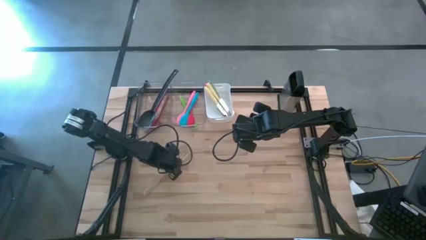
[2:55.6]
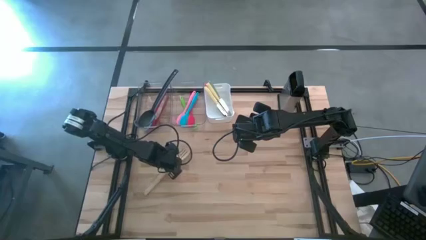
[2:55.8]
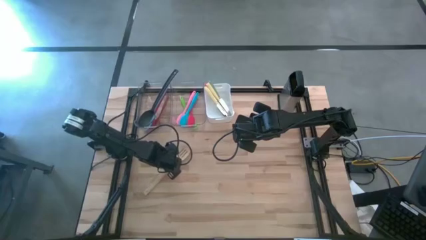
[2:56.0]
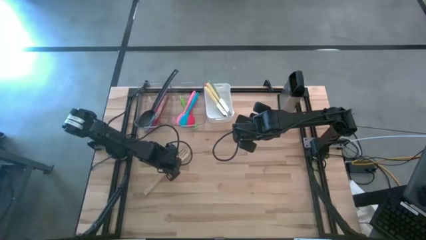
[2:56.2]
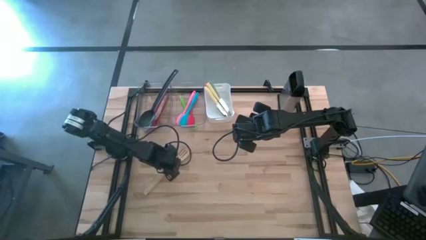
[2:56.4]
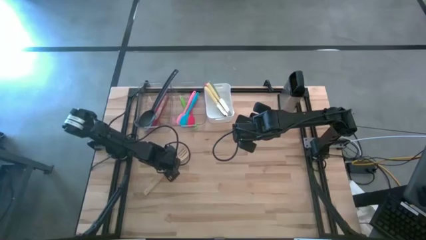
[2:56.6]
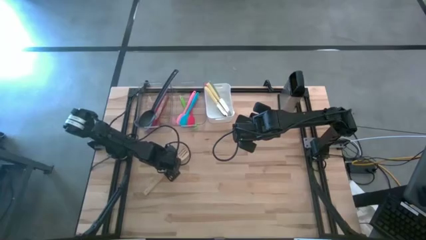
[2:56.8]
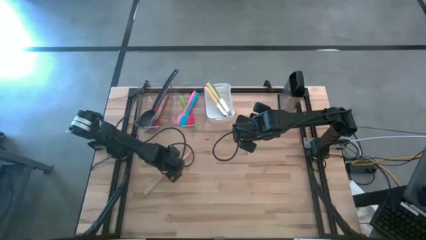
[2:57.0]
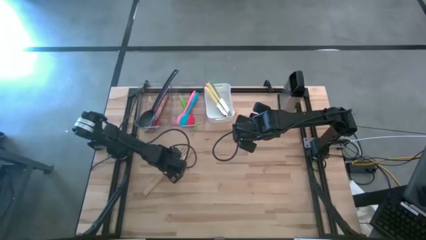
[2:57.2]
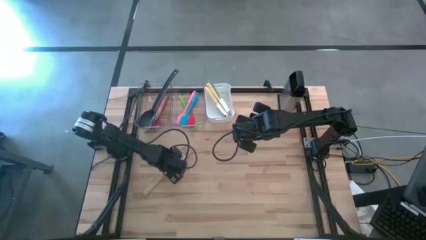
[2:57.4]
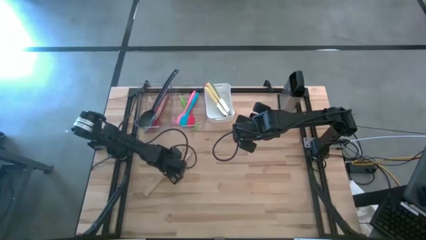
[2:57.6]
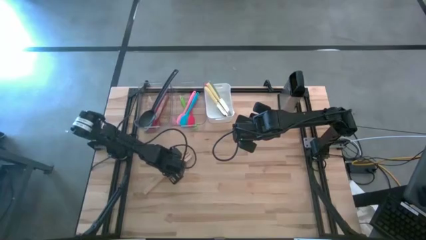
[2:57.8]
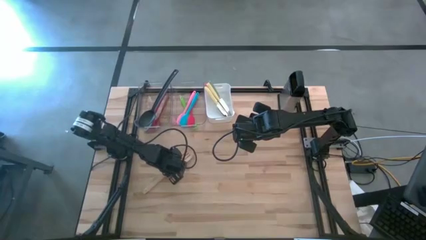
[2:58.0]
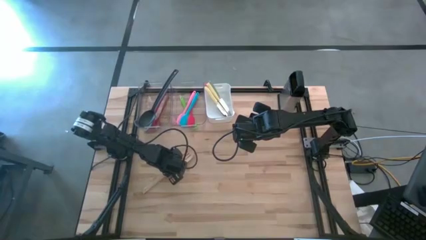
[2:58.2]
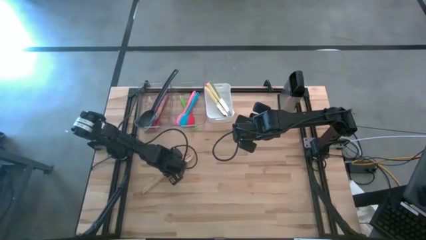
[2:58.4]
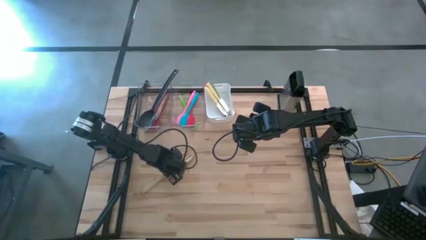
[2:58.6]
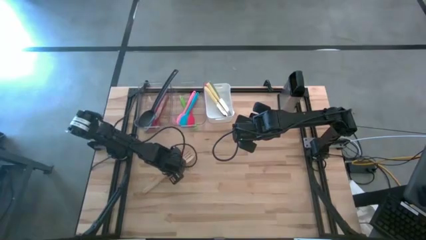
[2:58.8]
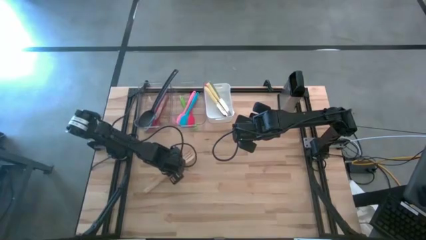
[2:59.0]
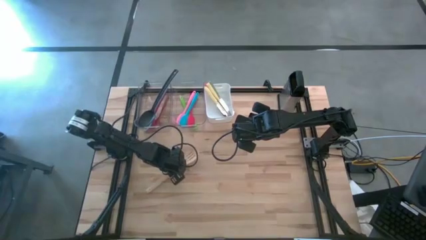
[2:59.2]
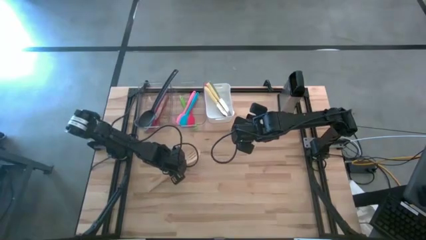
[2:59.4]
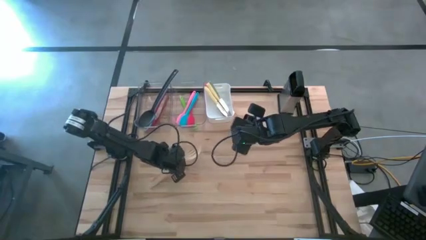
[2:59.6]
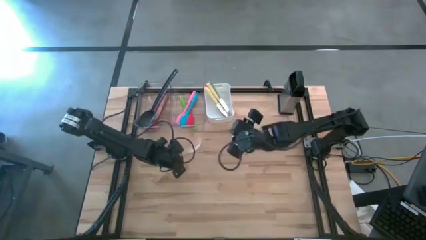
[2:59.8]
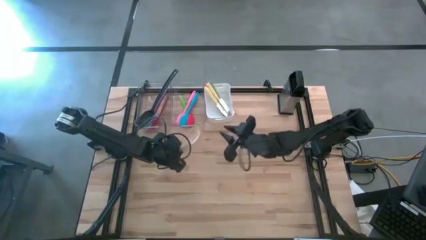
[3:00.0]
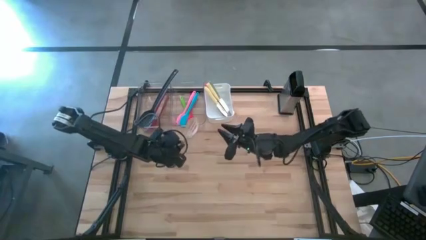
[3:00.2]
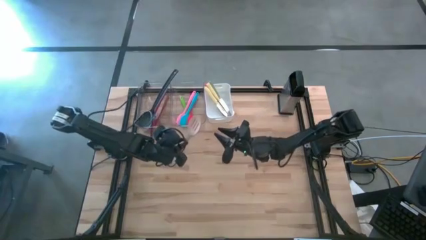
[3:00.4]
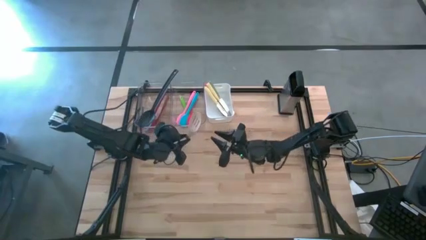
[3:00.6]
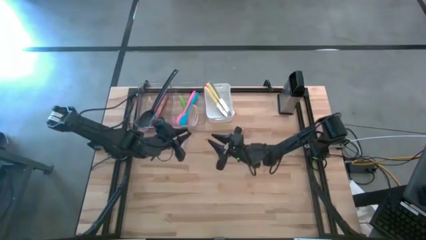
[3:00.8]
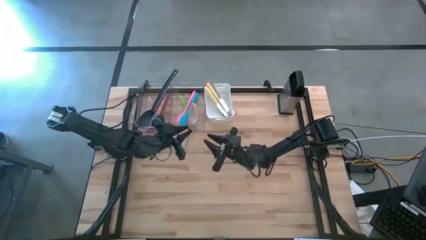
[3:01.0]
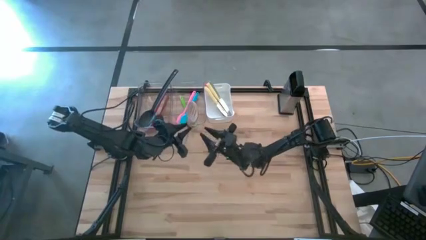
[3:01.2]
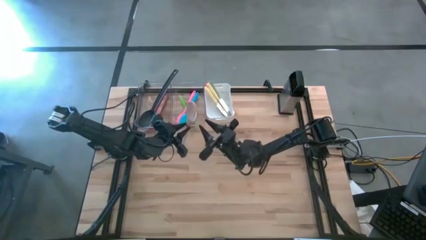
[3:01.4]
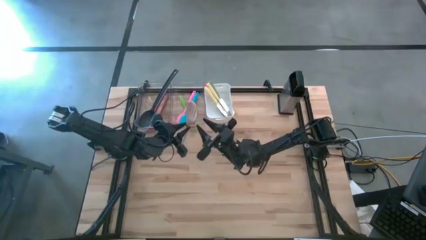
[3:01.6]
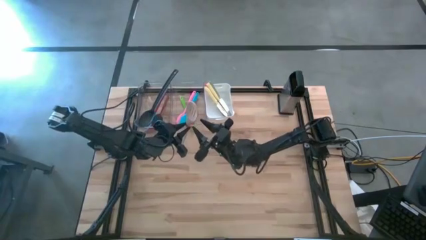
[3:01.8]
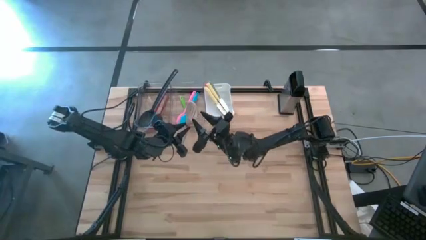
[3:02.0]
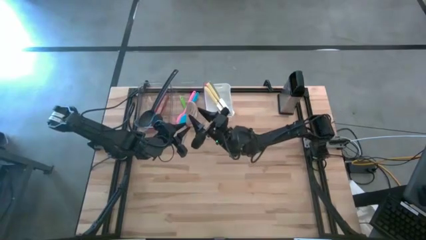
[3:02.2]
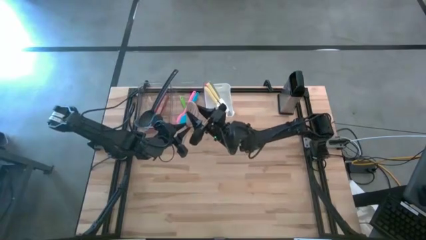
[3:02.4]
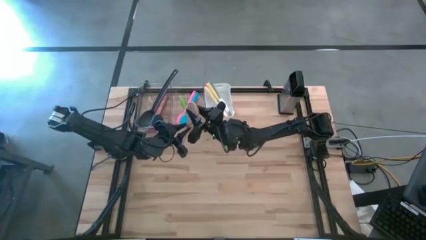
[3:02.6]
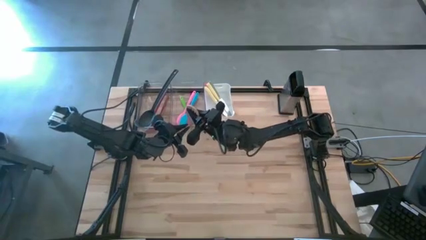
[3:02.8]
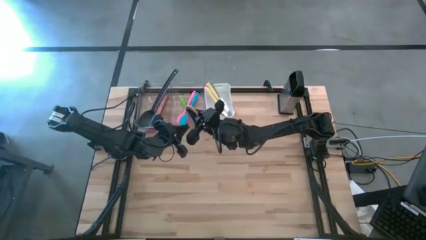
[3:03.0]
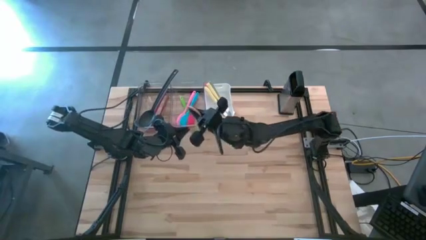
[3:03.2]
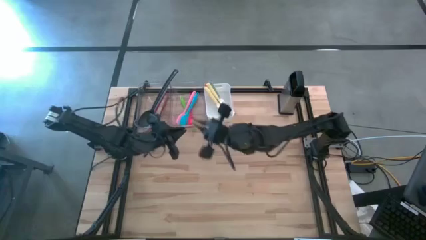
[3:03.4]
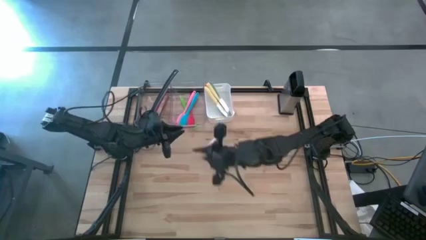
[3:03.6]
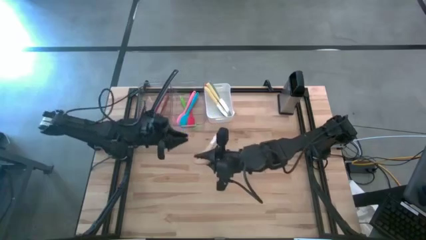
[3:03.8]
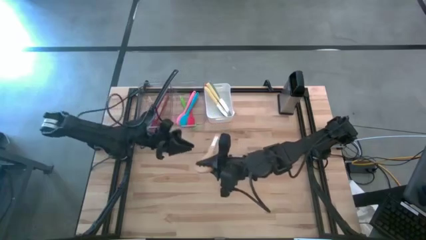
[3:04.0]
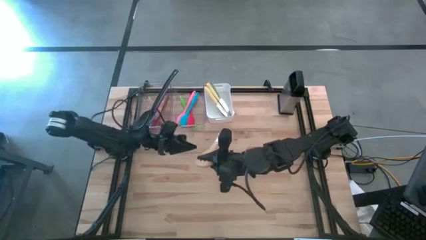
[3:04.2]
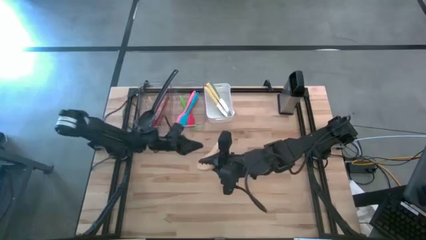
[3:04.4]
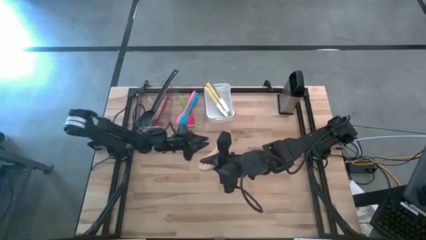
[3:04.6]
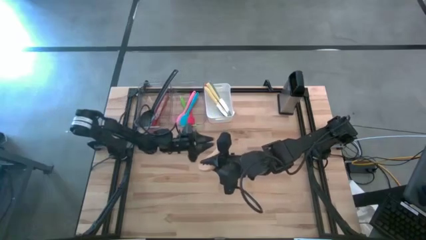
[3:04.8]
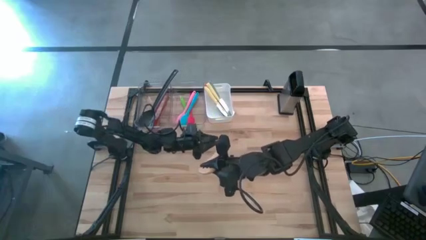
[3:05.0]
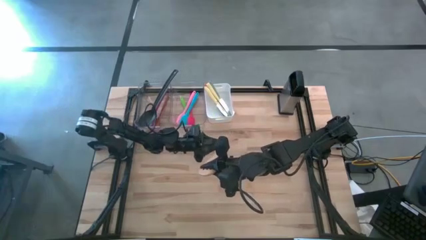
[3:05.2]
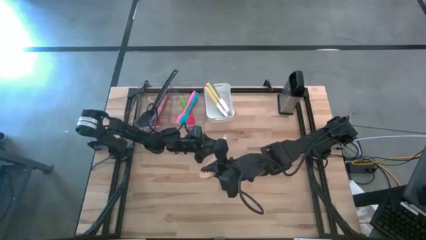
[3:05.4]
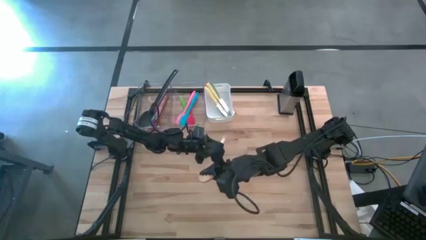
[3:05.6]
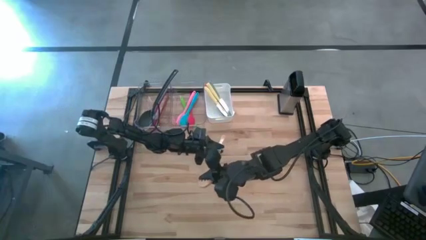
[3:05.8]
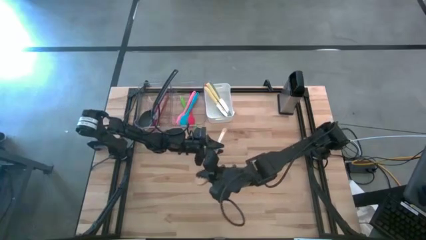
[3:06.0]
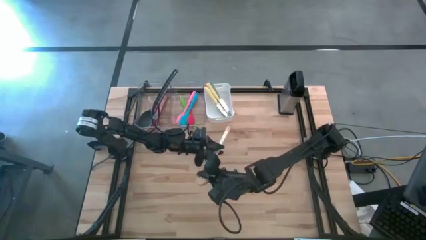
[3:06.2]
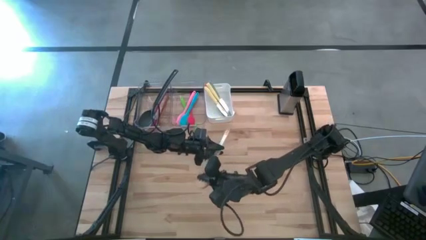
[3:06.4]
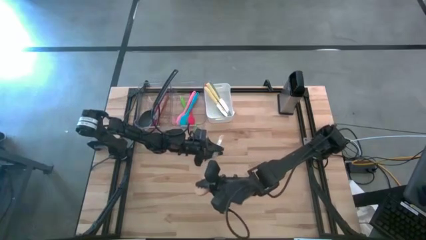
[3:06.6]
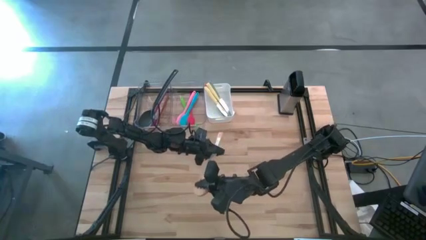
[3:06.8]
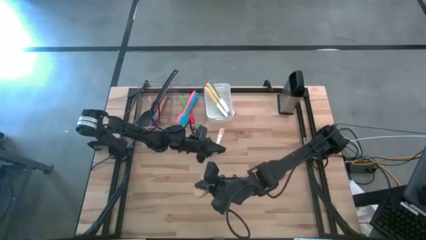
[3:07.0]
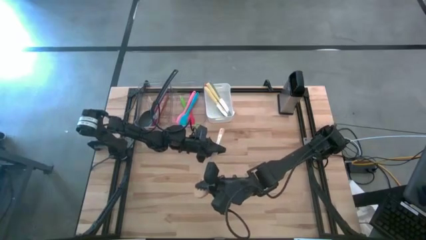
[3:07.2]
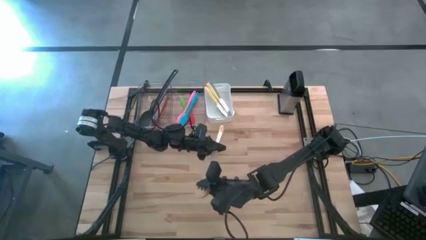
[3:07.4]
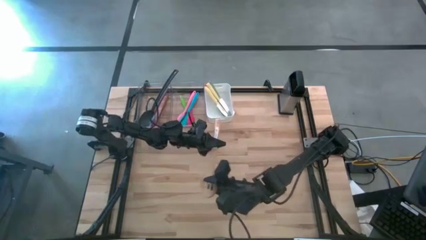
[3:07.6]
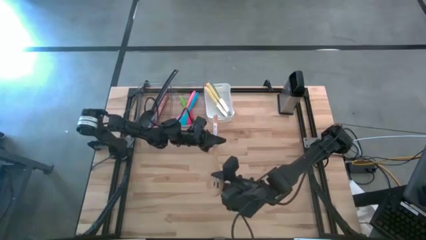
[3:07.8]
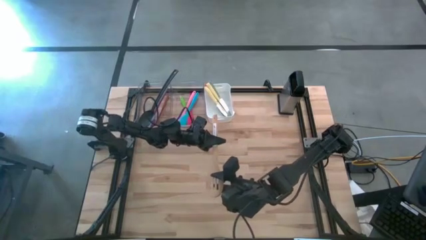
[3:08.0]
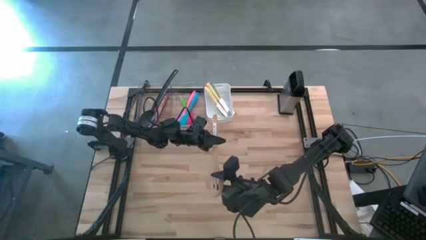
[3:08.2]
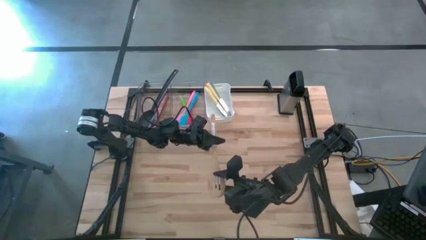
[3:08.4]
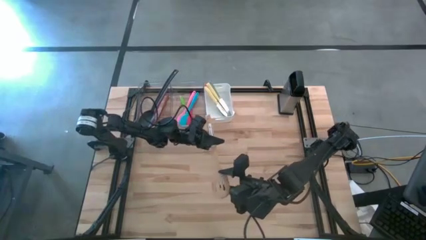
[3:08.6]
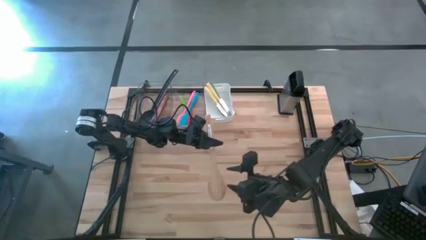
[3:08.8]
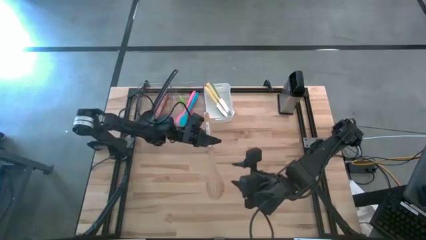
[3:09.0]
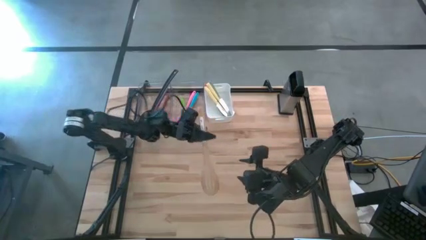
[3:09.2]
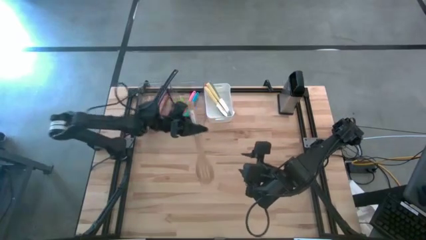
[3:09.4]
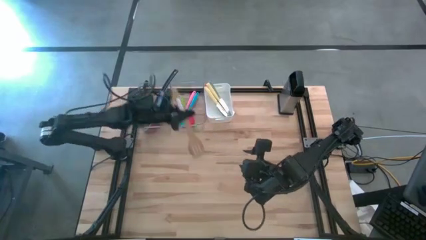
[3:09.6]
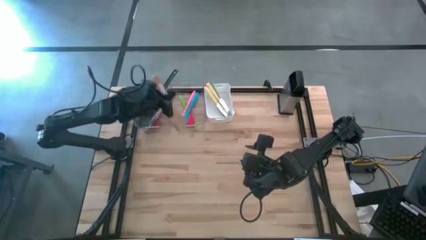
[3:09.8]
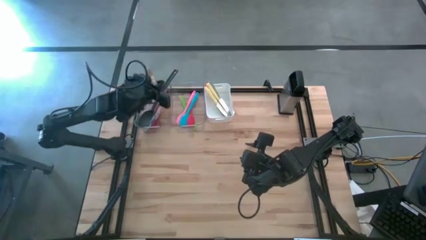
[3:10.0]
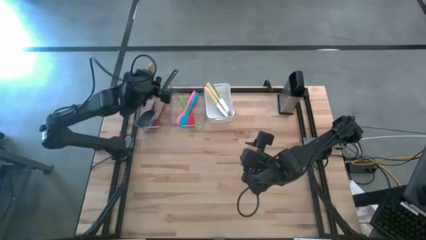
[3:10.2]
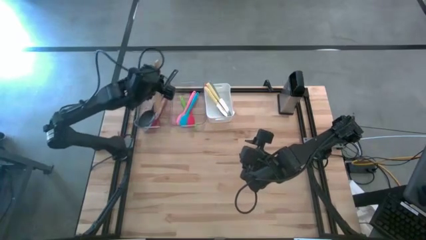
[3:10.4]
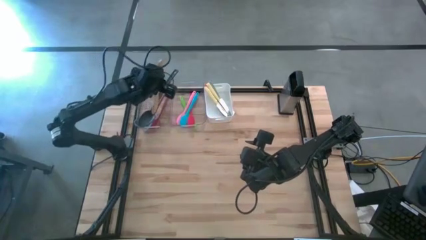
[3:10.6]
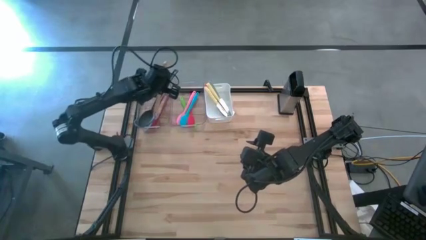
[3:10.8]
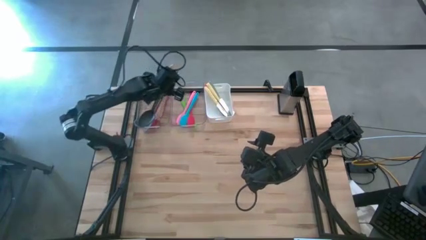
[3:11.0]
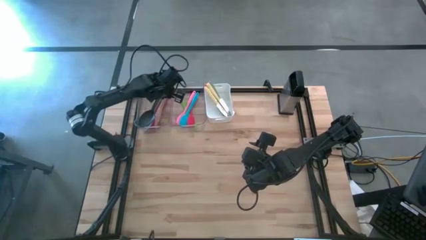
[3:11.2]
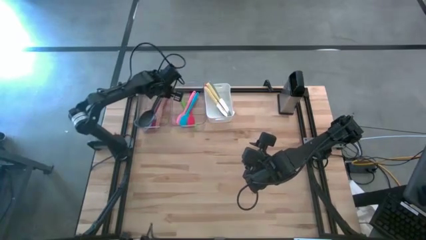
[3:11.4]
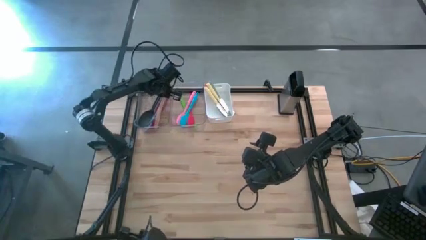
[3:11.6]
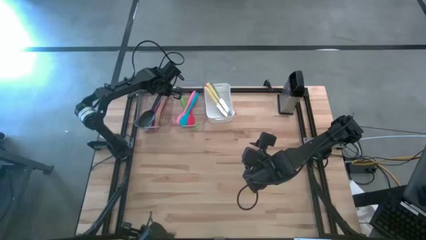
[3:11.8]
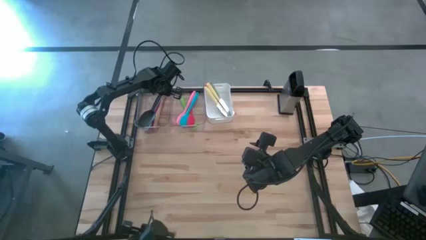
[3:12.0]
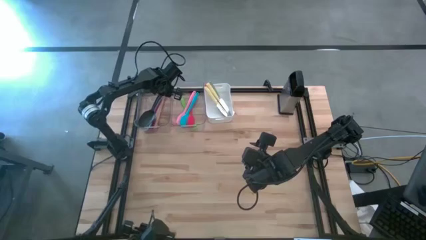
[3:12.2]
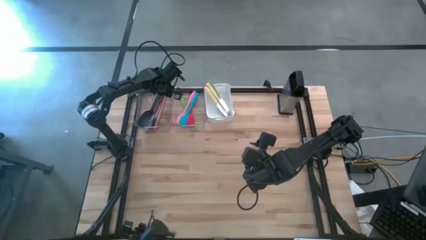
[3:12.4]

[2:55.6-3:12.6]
Task: Pick & Place Kitchen Items
Put the light brown serving spoon into the left transparent bin
